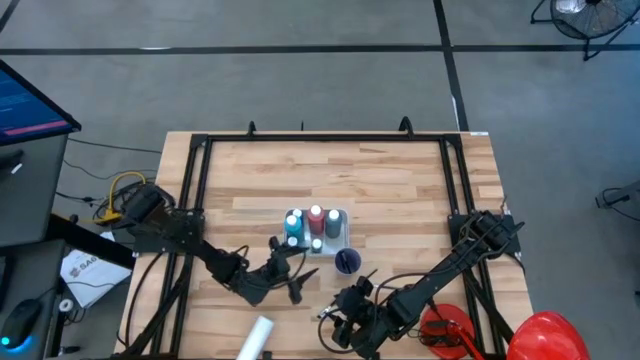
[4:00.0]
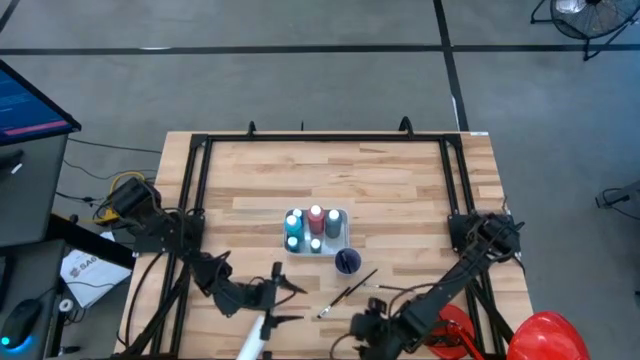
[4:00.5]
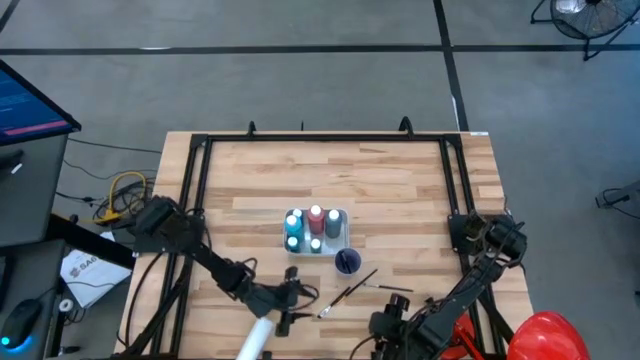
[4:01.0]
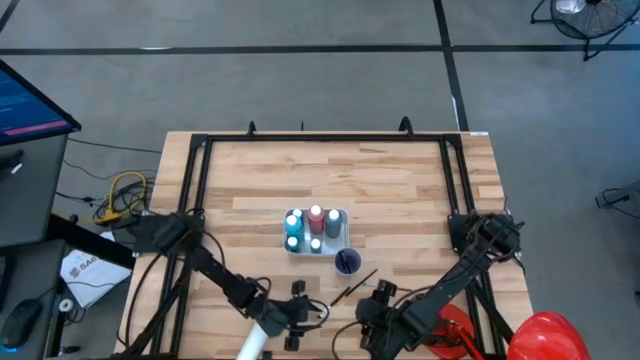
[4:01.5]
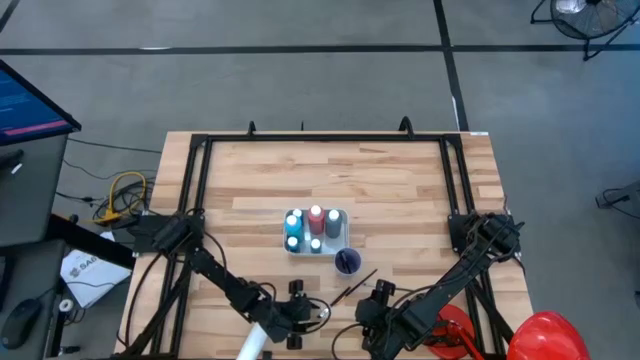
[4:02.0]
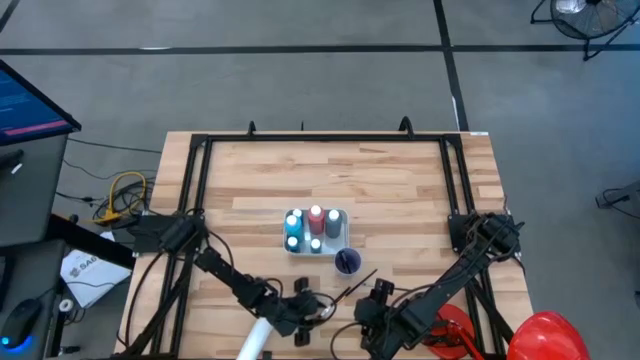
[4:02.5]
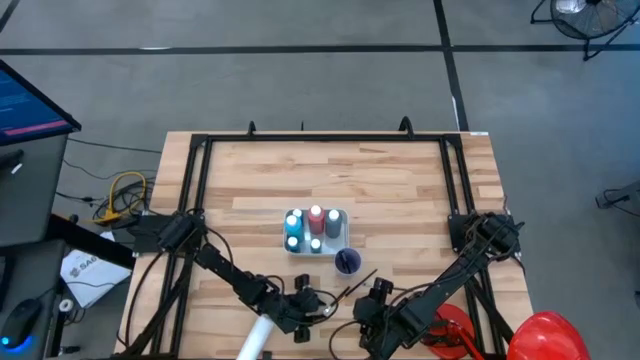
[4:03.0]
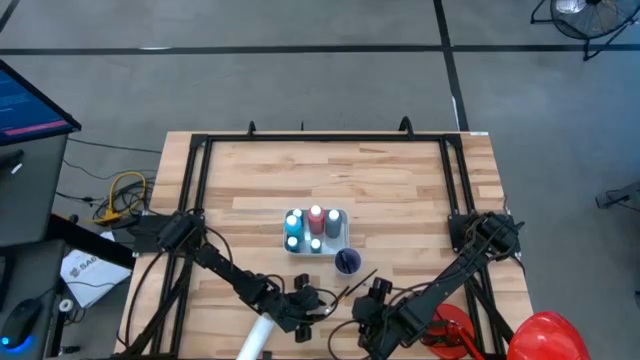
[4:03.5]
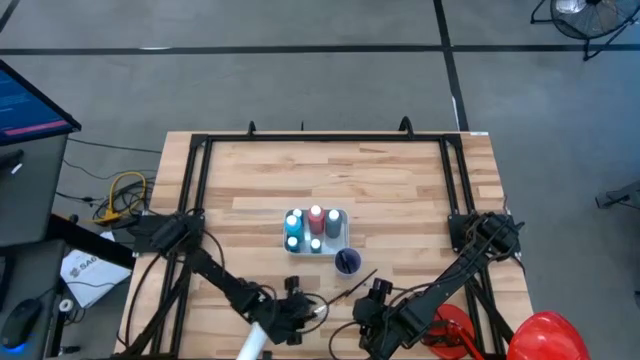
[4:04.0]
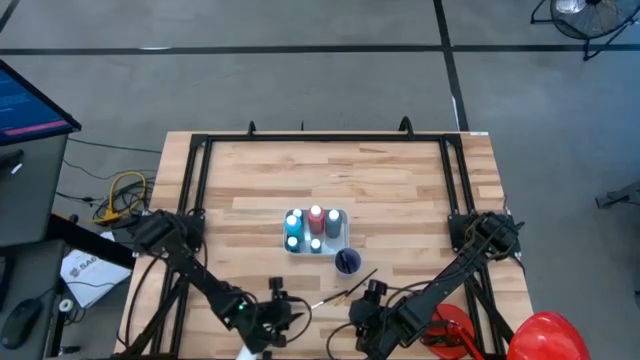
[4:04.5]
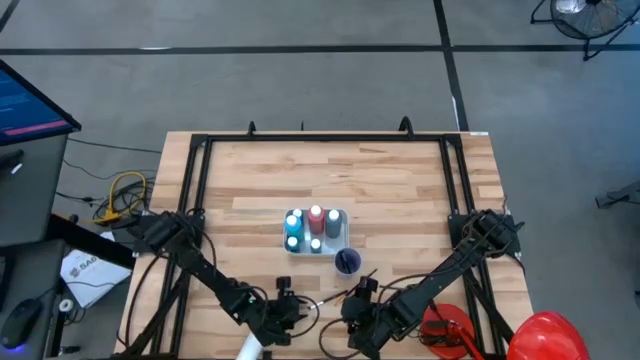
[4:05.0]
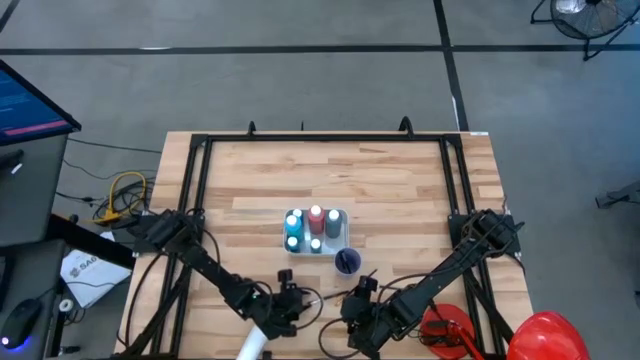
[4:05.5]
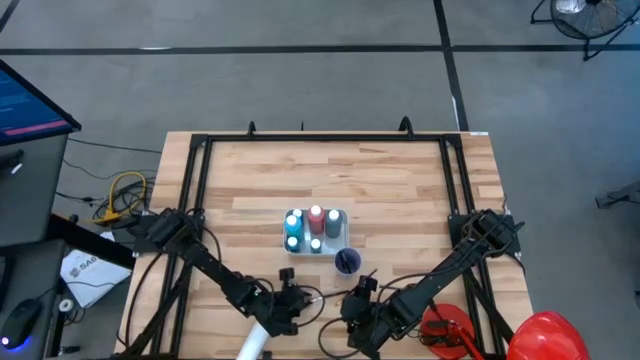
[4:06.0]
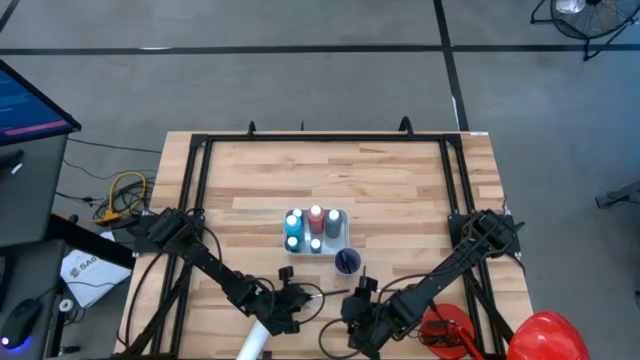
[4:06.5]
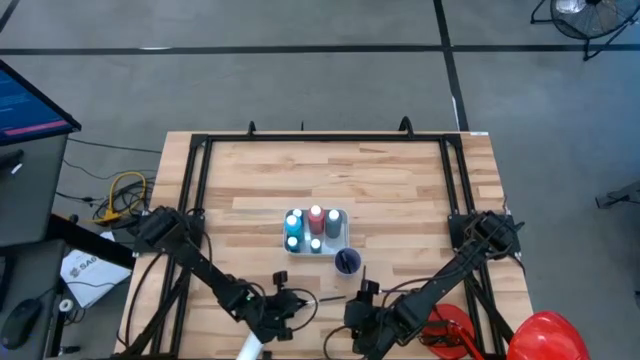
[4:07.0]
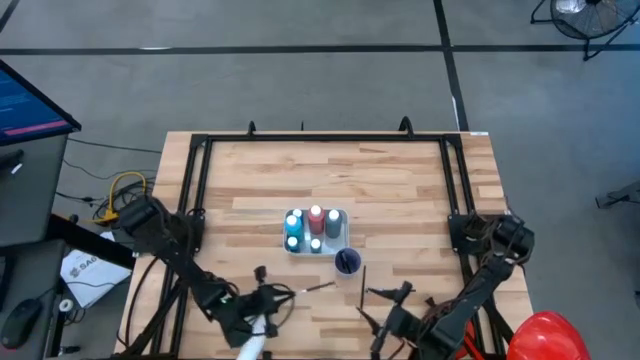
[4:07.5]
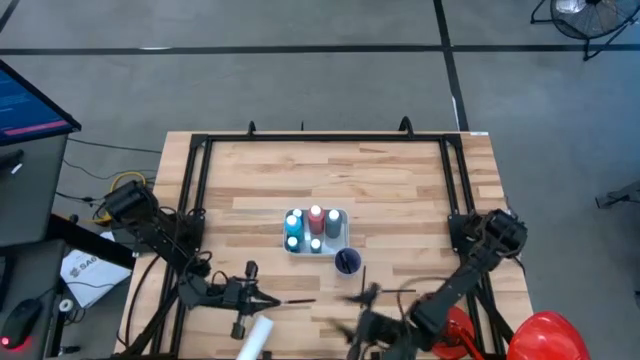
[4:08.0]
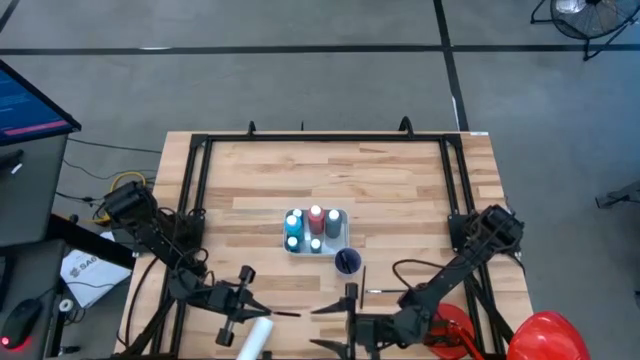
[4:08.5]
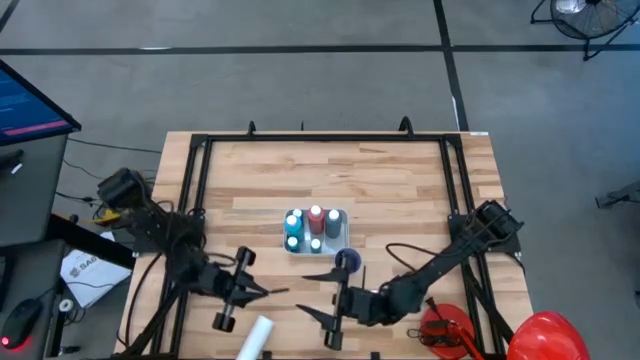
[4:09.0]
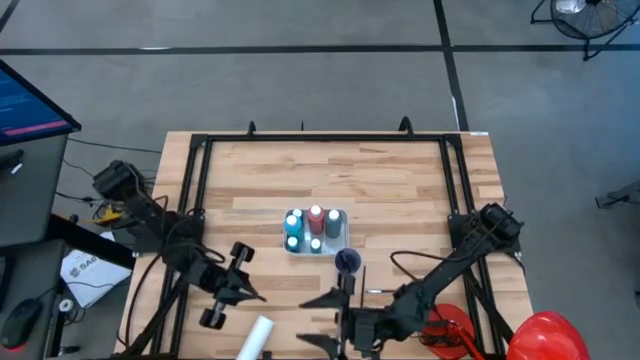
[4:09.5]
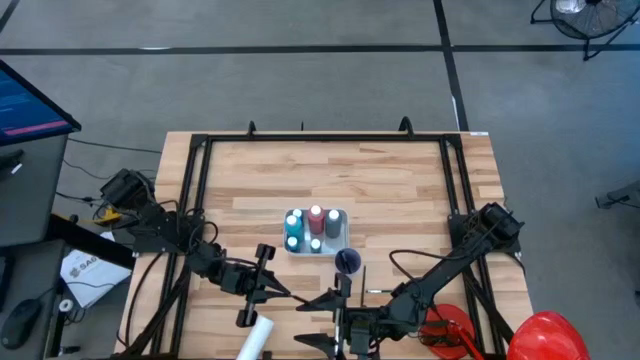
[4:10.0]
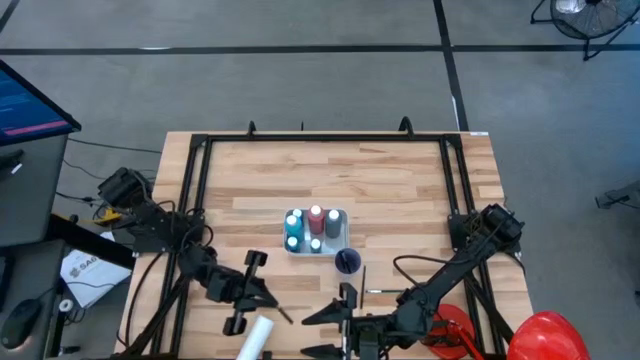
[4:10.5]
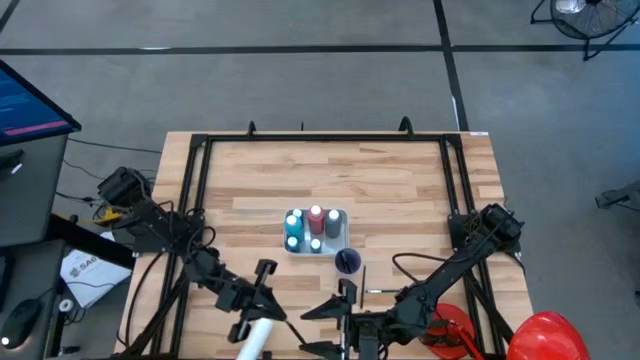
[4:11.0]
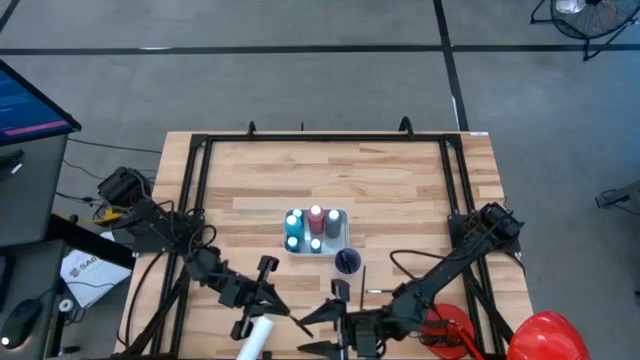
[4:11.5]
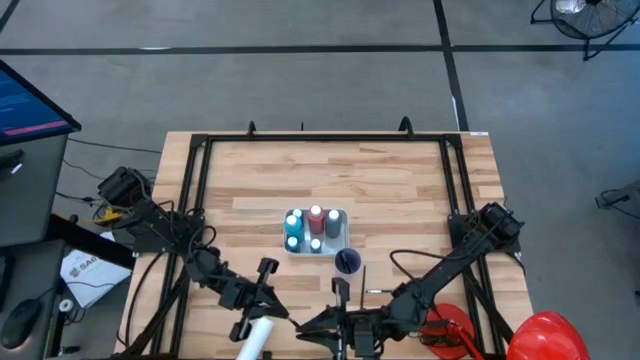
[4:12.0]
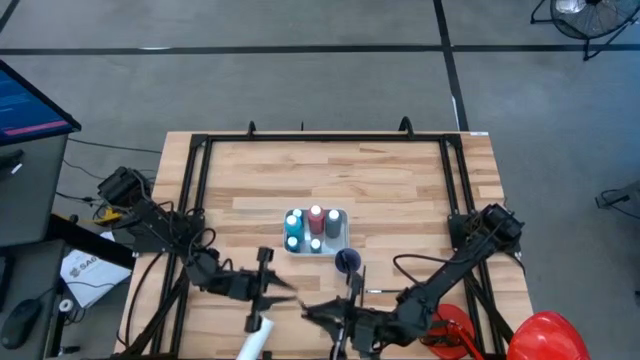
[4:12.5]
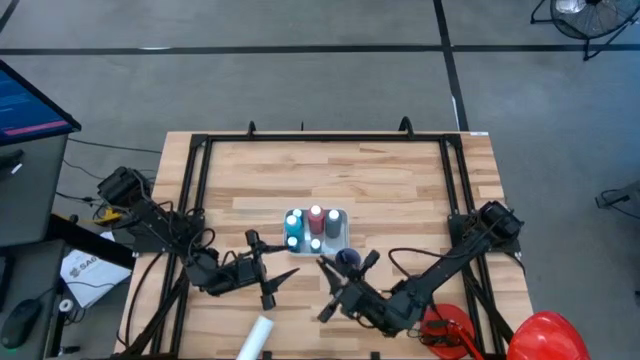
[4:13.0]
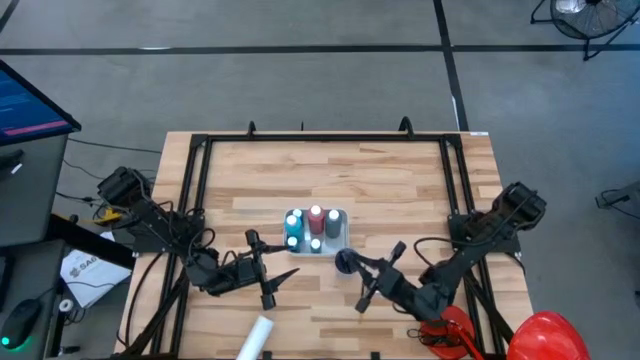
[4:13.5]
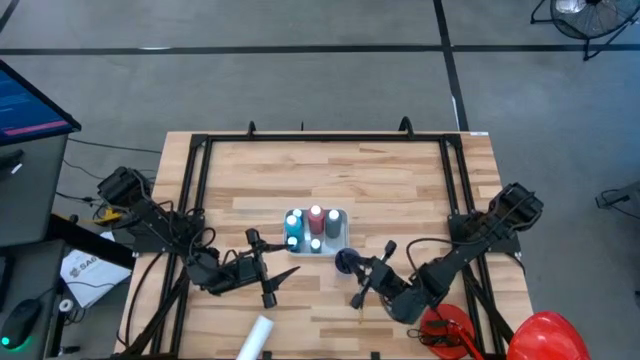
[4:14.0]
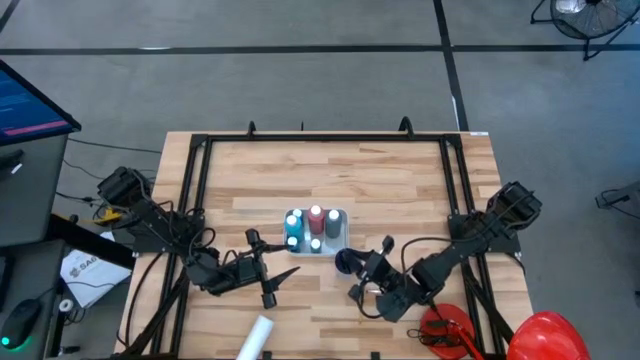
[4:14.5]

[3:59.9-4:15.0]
Task: Pick & Place Paint Supplies
Put the silver paintbrush into the blue cup

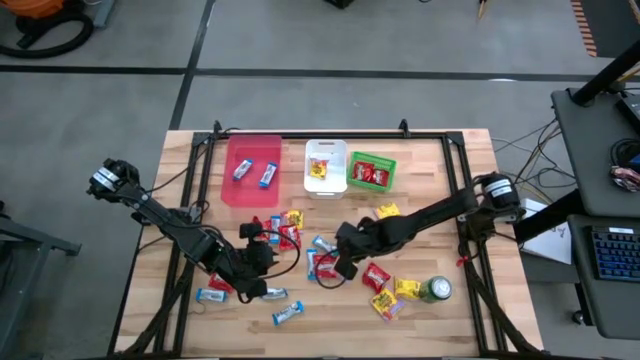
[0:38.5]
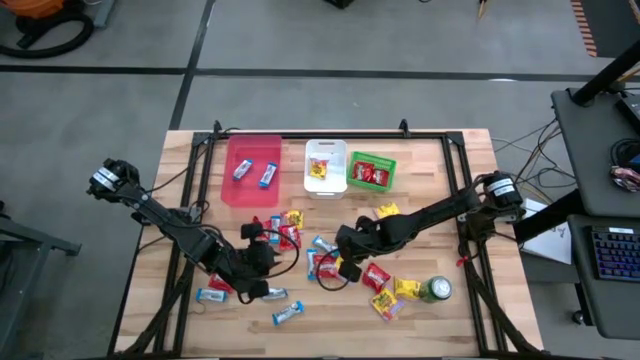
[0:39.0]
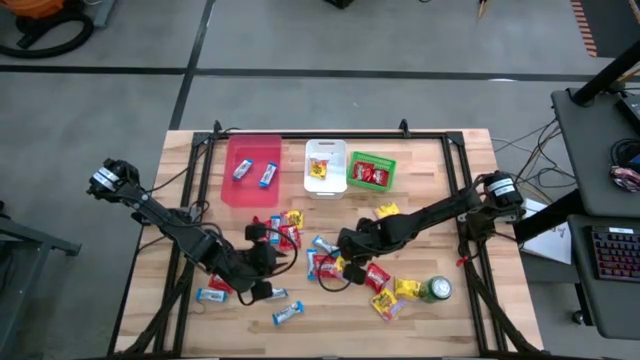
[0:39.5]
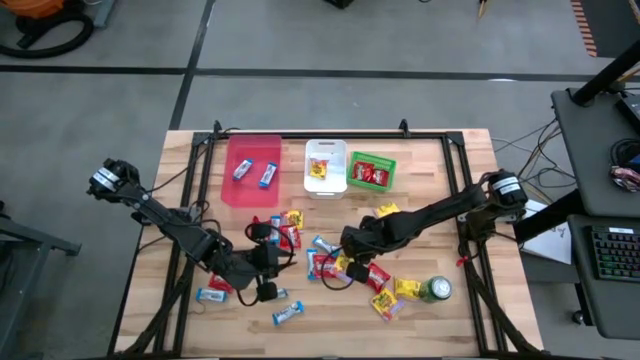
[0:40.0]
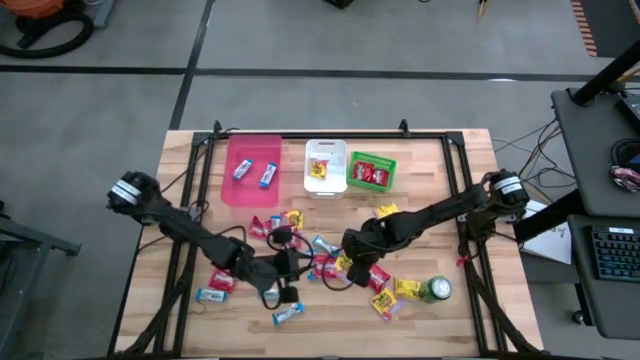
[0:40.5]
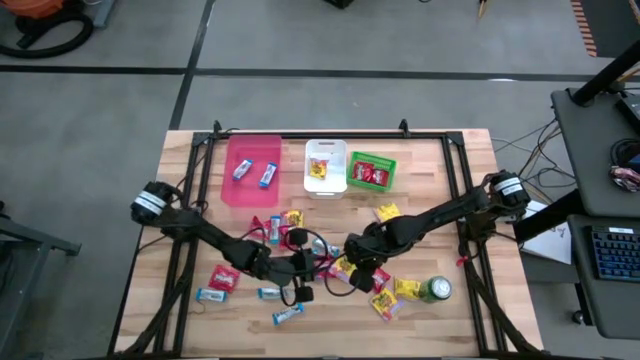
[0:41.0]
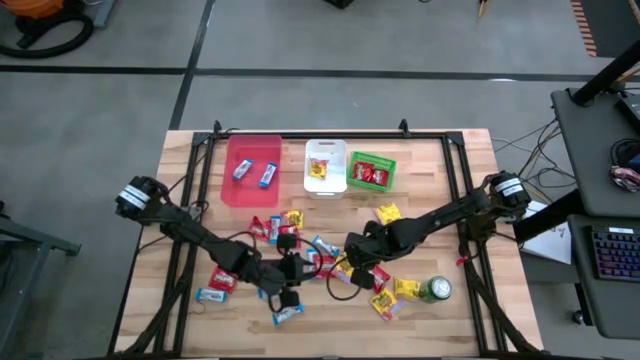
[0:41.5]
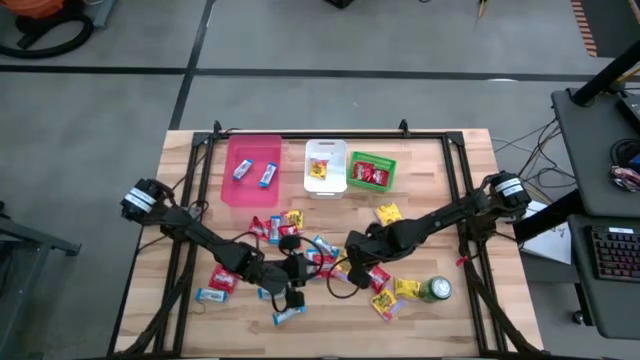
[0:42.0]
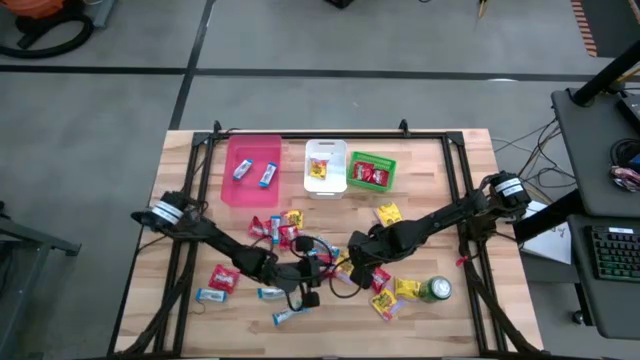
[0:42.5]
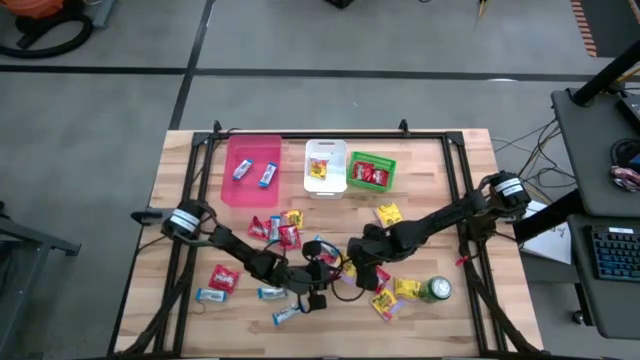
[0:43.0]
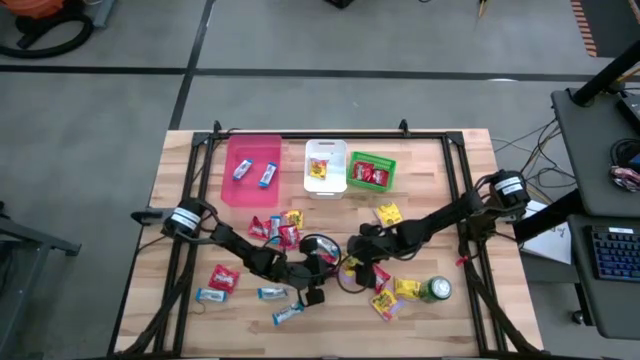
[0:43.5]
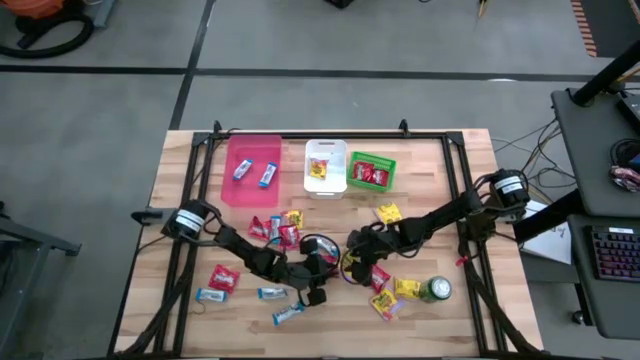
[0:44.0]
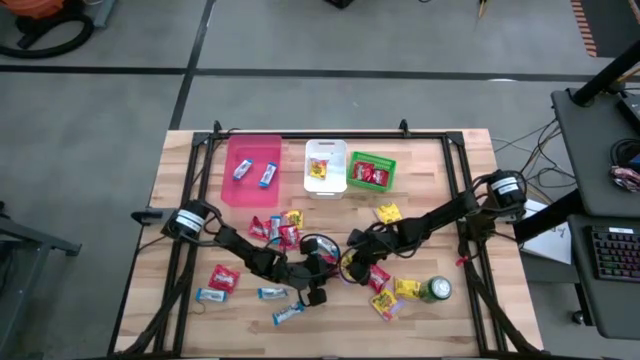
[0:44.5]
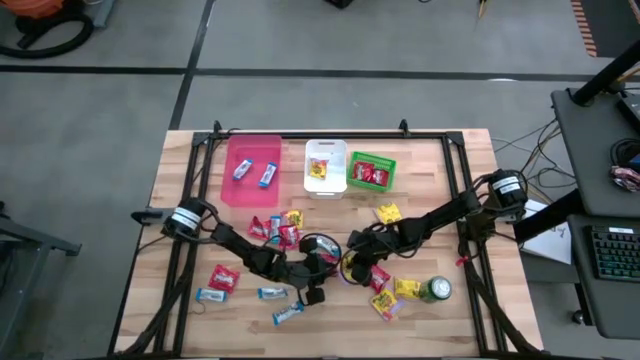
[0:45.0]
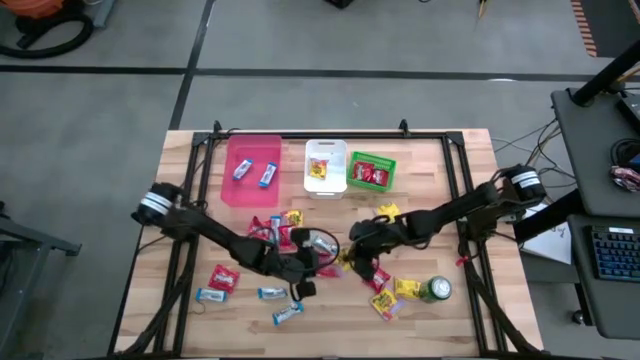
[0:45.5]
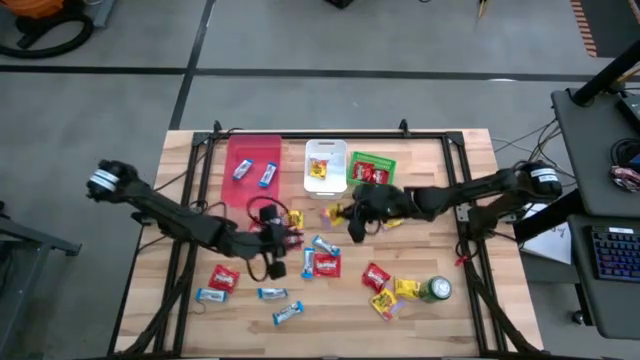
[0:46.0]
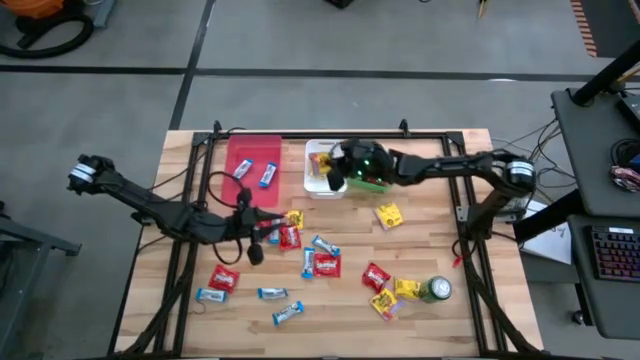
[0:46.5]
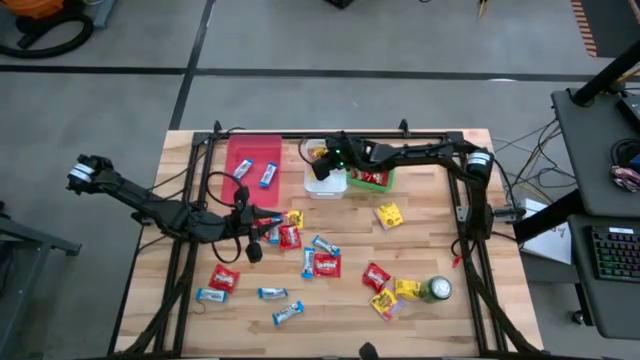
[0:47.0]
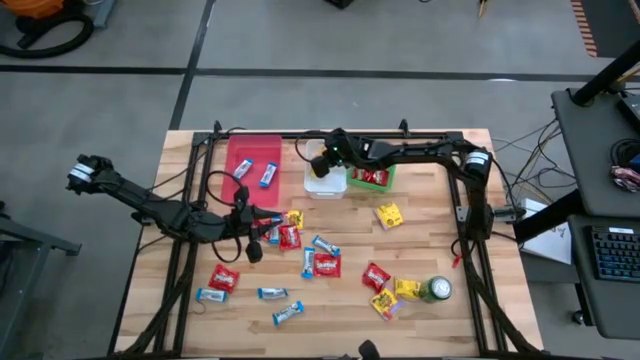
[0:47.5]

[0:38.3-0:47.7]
Task: Sort candy
Put the yellow candy into the white bin
